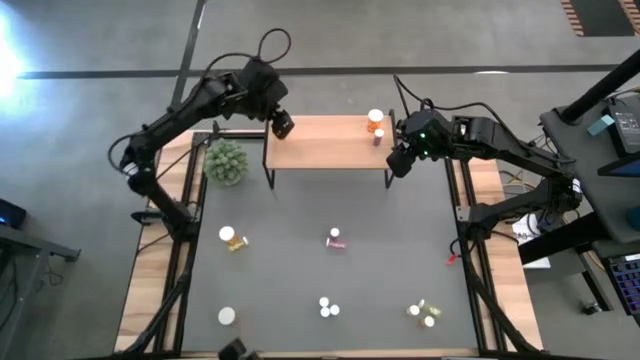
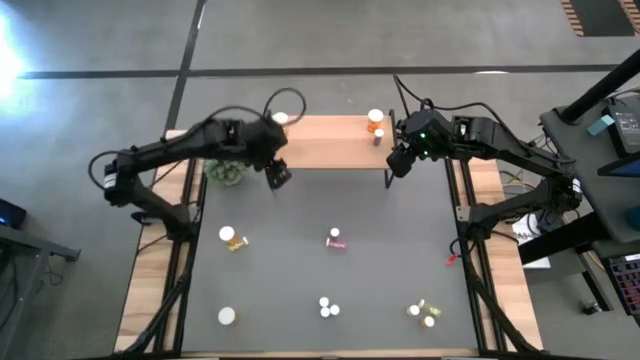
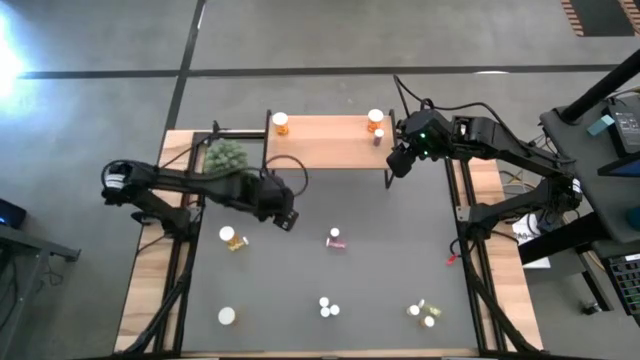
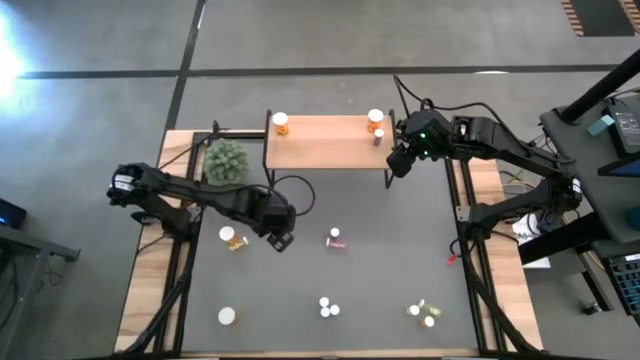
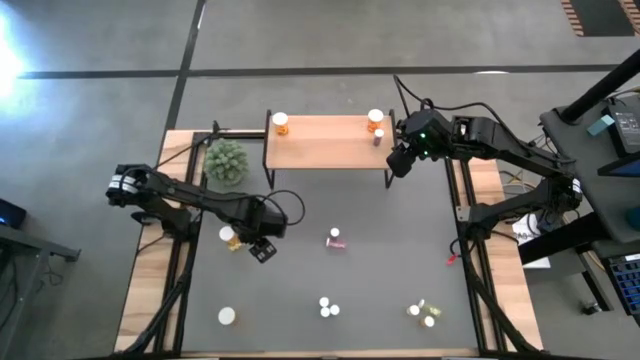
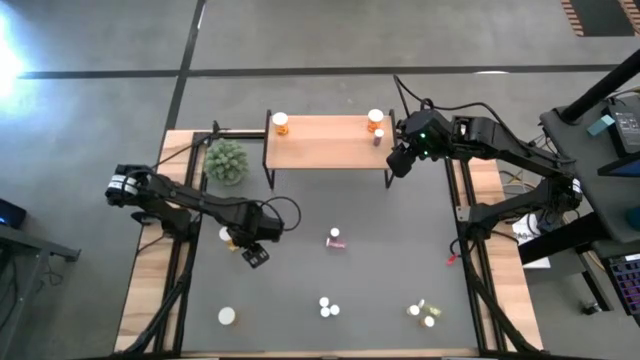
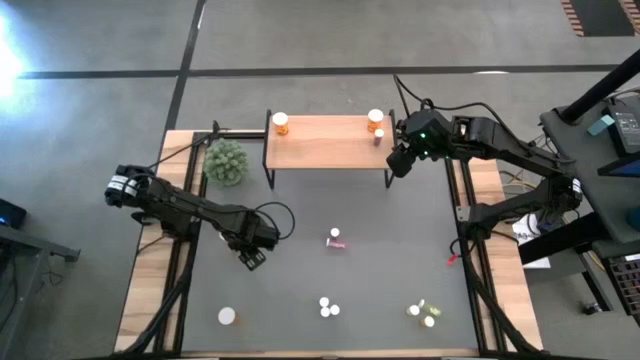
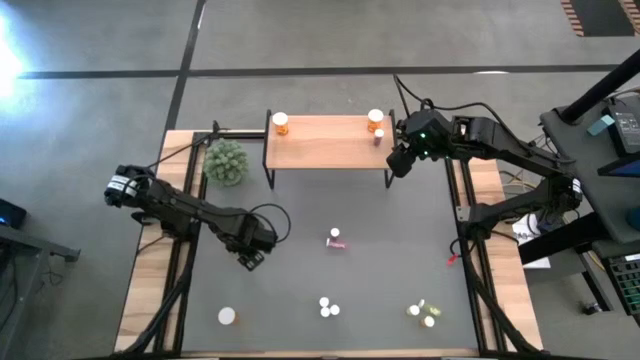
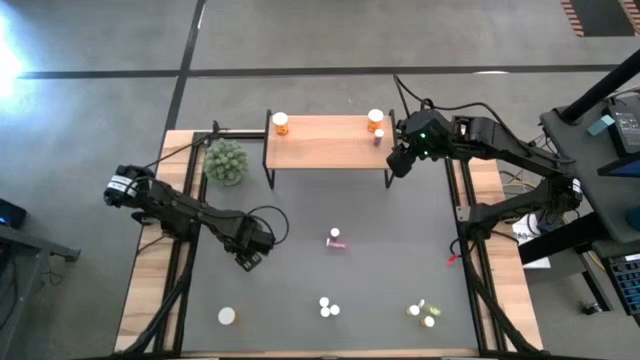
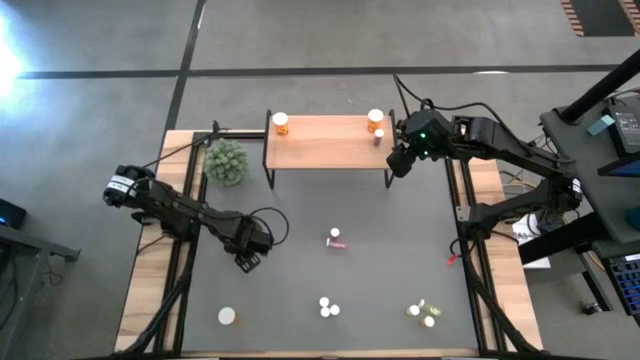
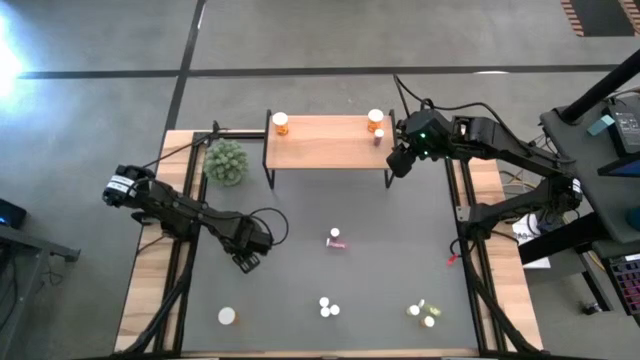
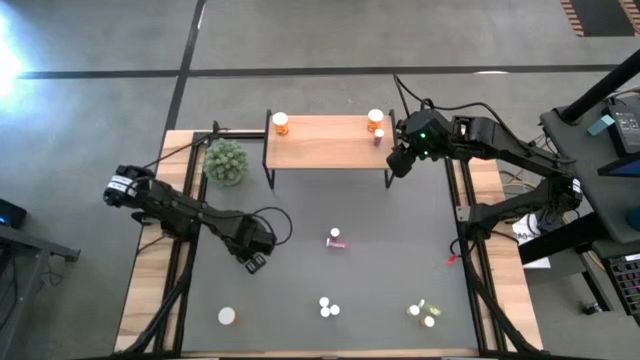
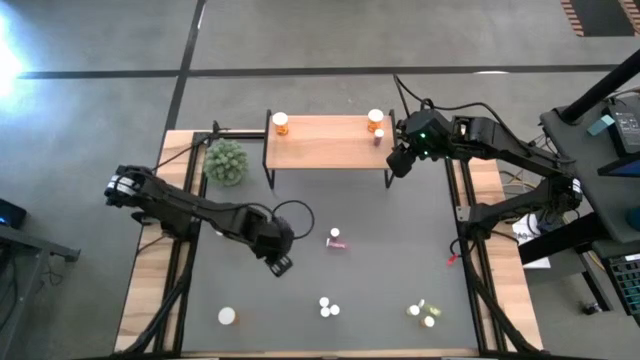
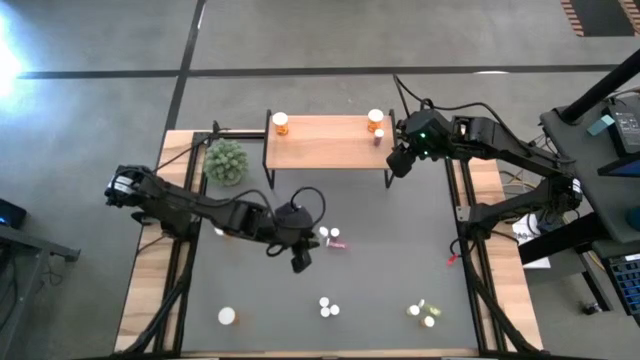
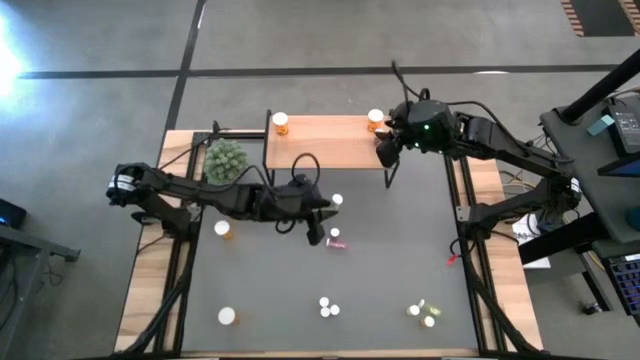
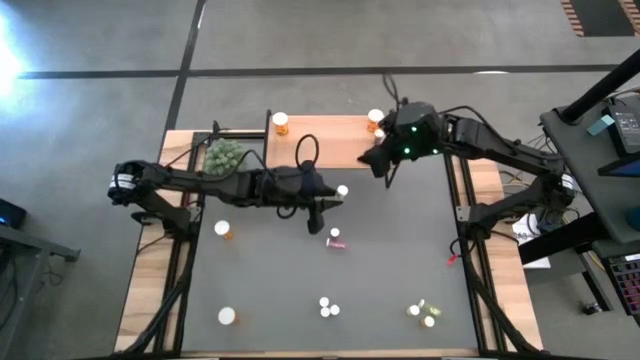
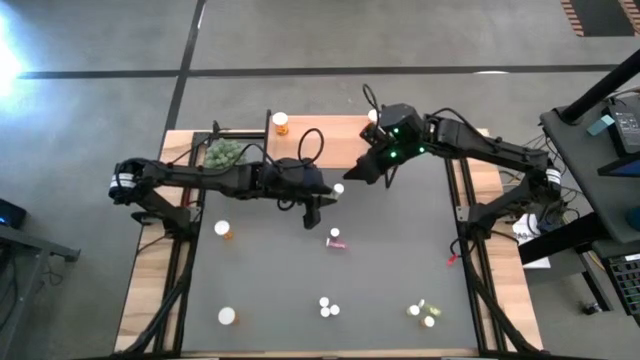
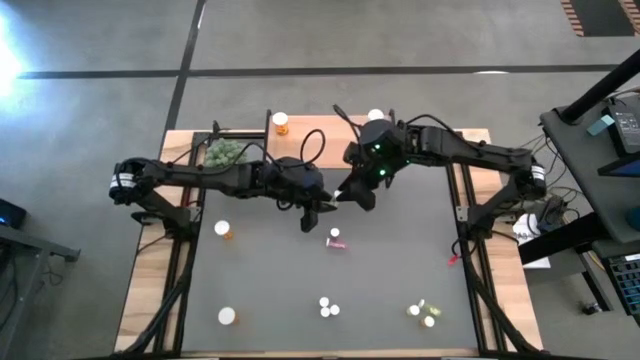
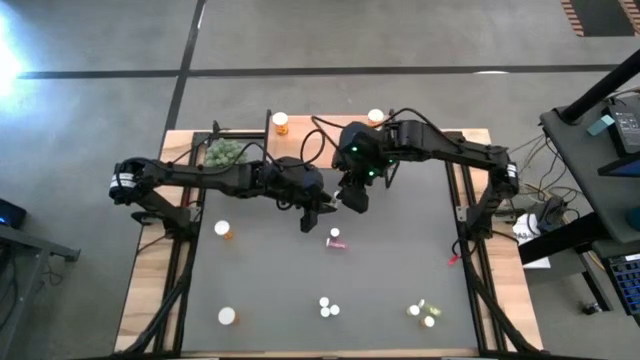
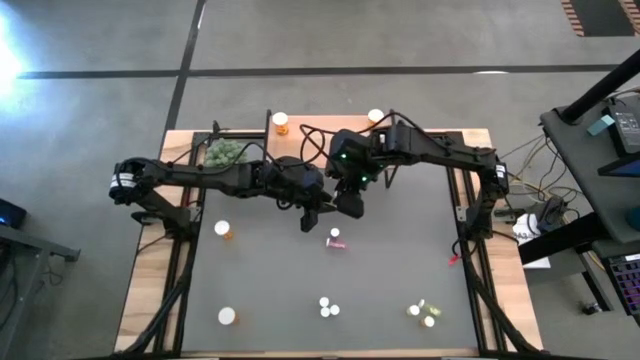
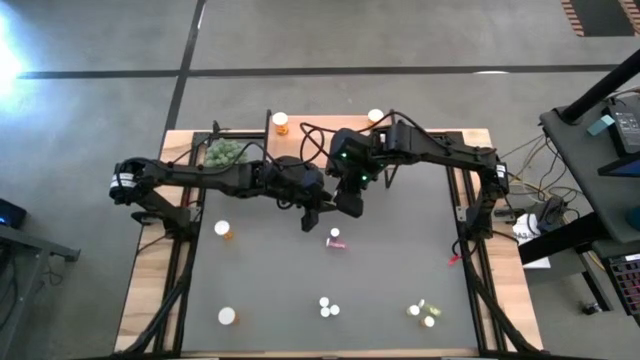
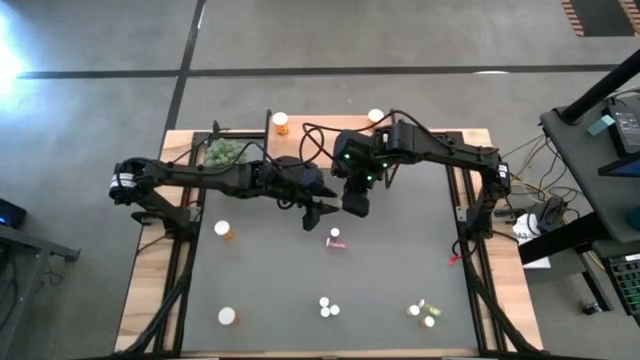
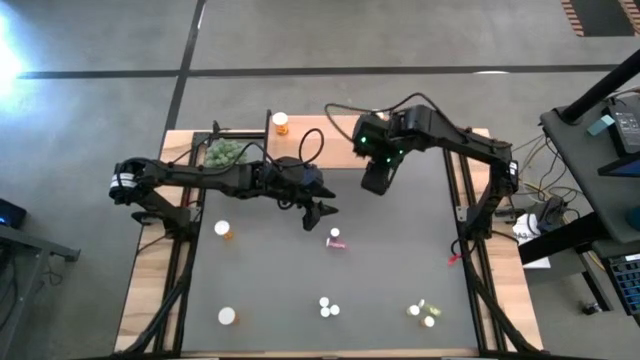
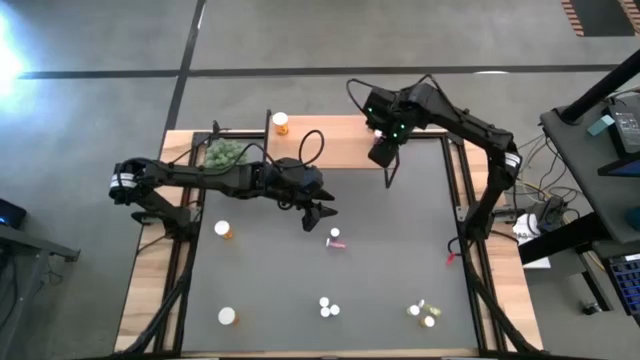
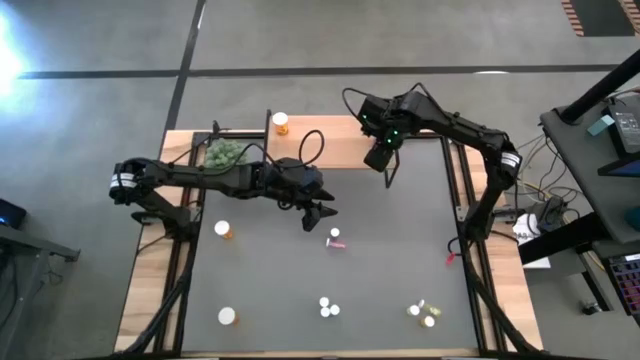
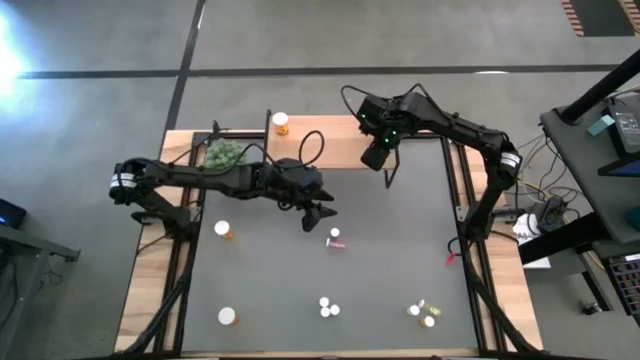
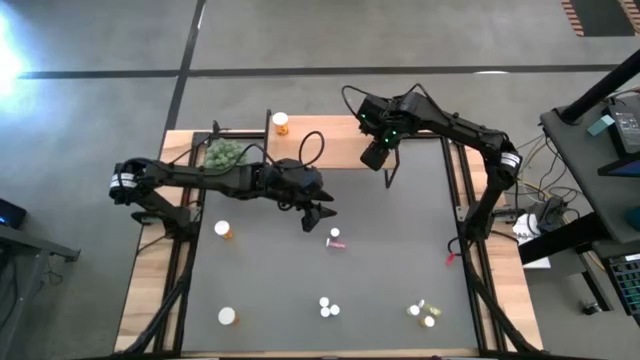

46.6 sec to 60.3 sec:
Task: Pick and place medicine bottles onto shelf by color
Put the small yellow pill bottle on the shelf

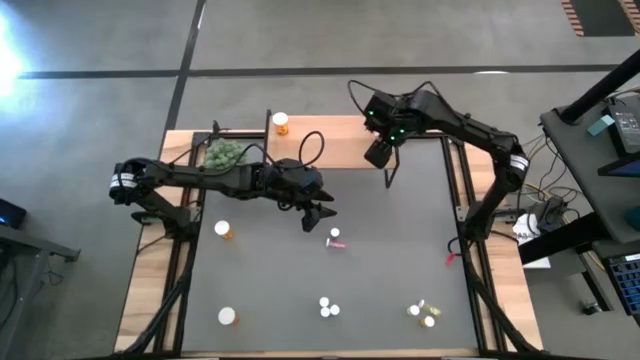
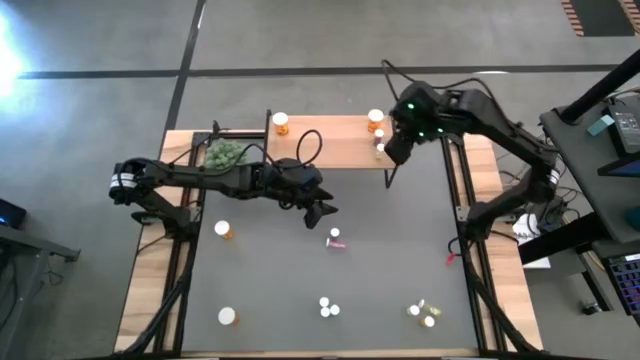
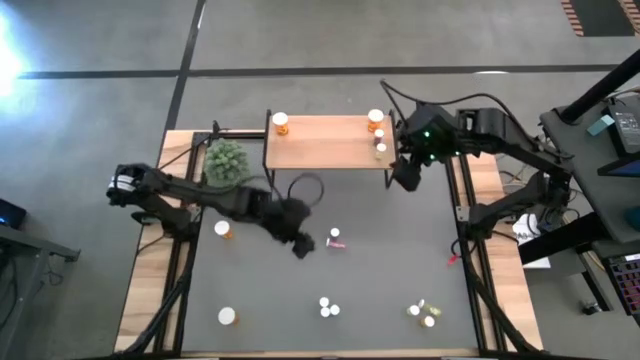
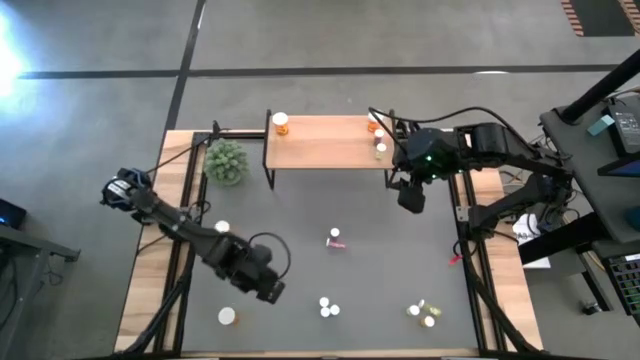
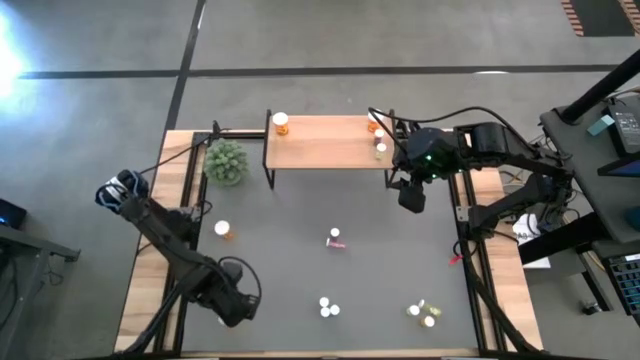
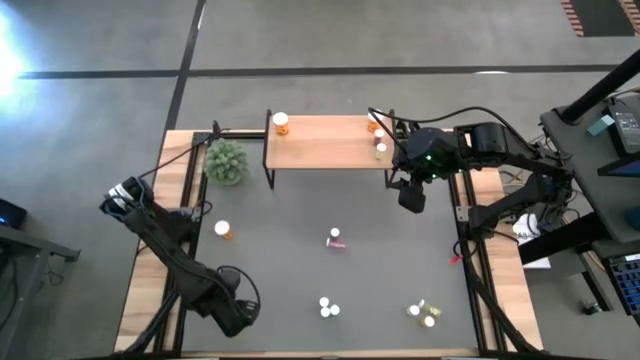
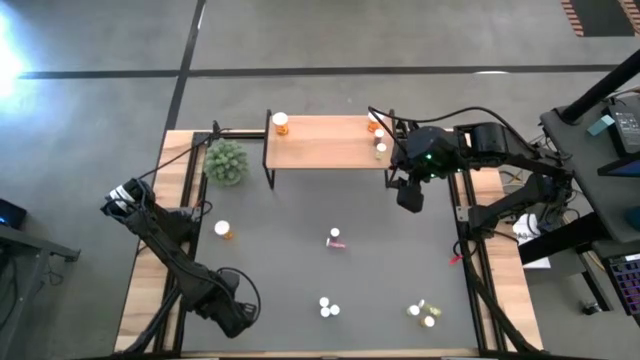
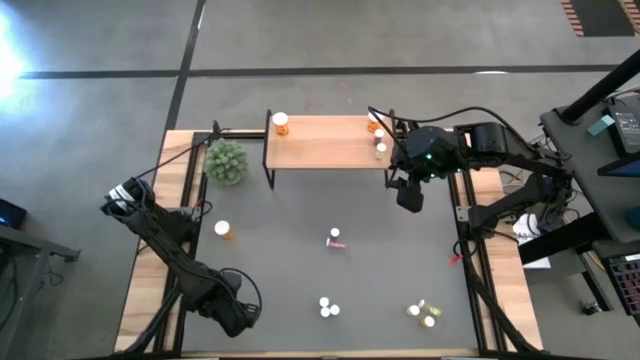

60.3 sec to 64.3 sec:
Put the large orange pill bottle on the shelf

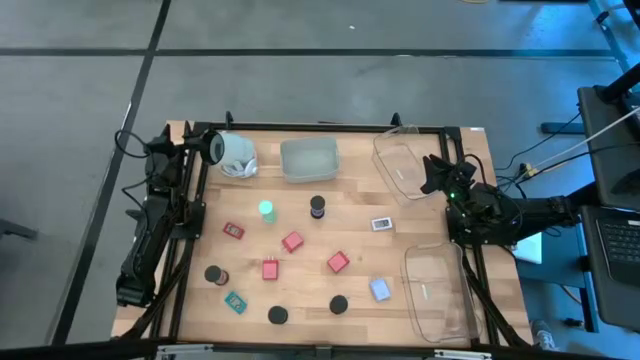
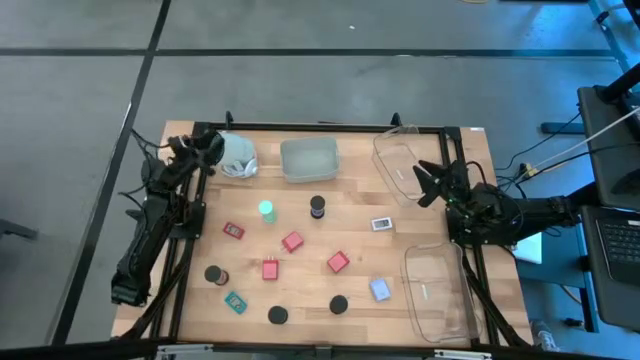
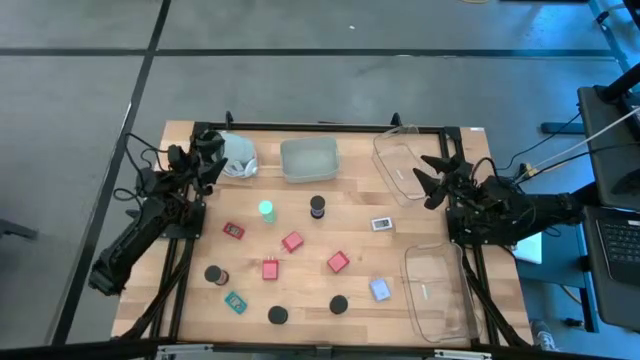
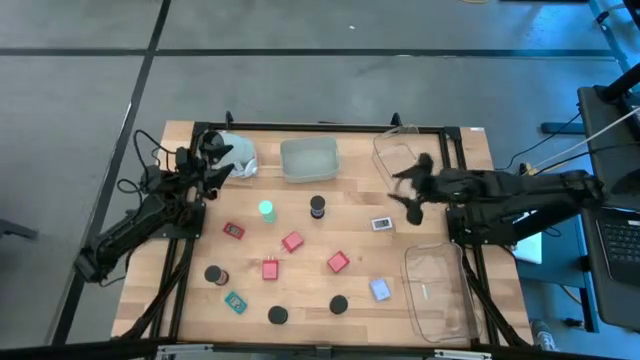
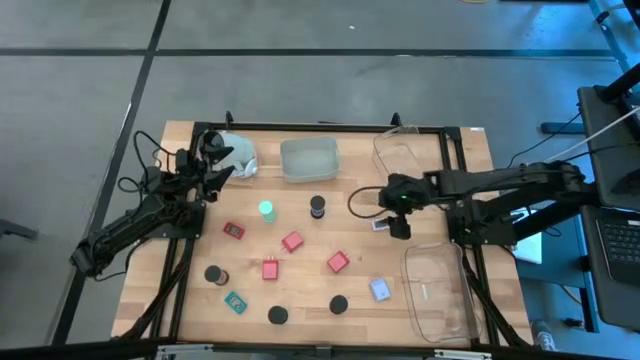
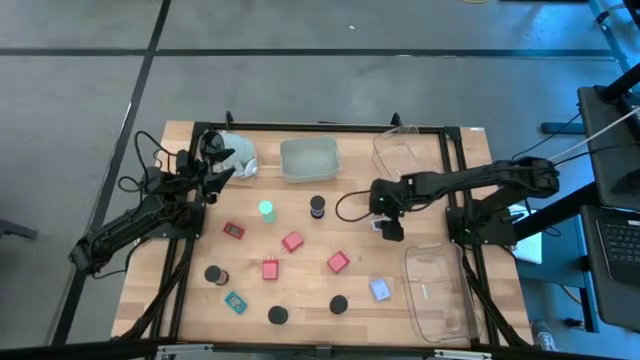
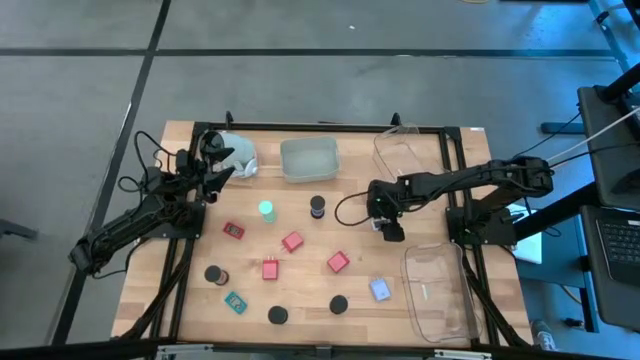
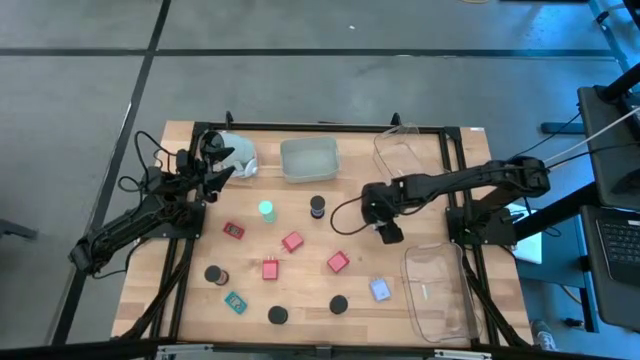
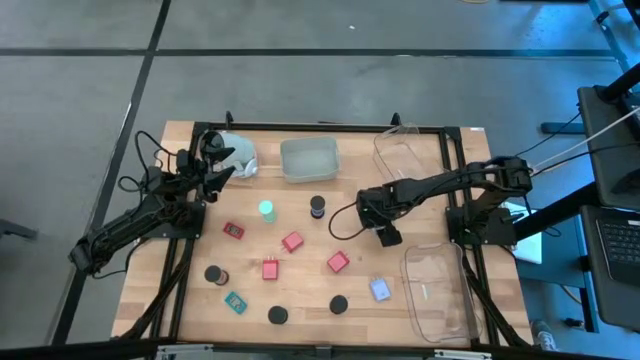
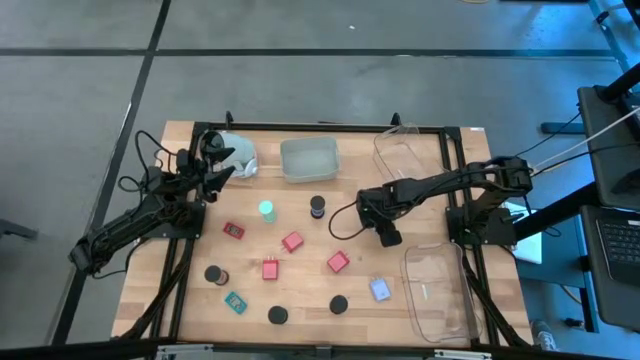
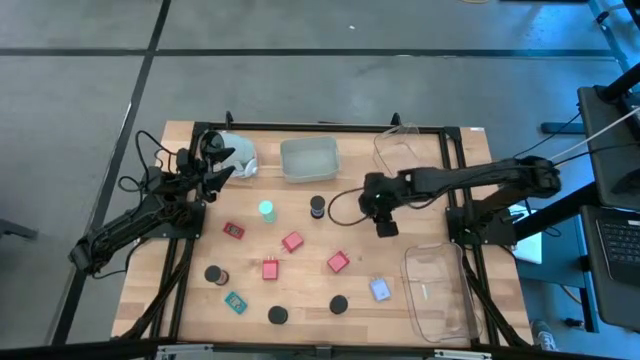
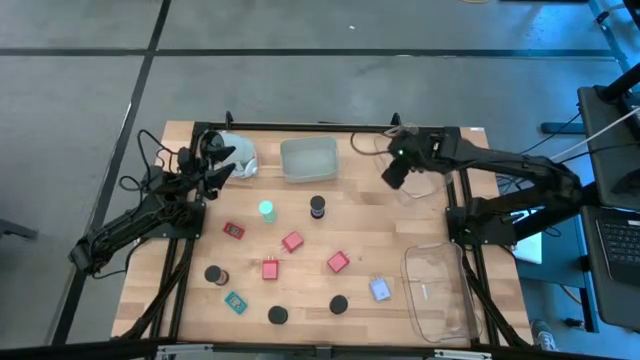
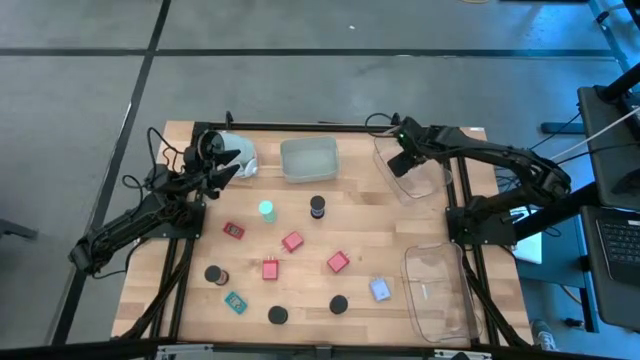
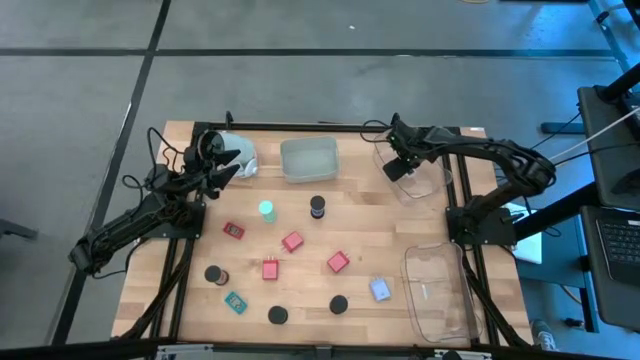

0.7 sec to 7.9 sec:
Task: Pick & Place Office items
Put the white digital clock into the top transparent bin
